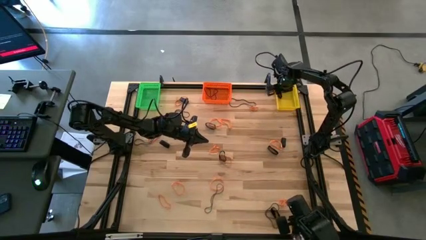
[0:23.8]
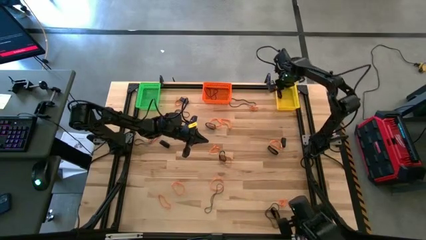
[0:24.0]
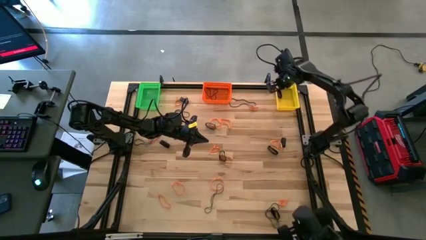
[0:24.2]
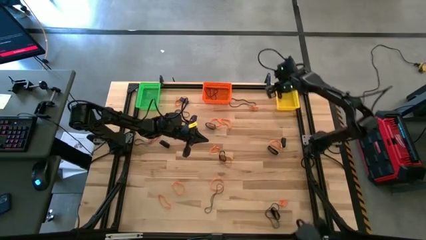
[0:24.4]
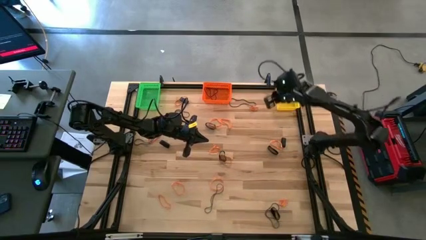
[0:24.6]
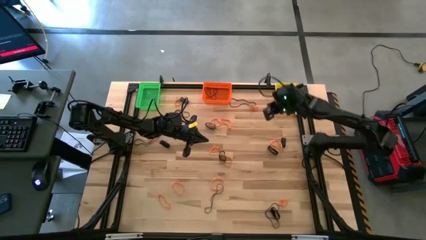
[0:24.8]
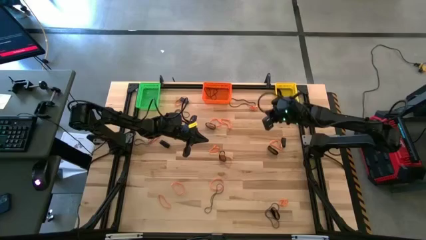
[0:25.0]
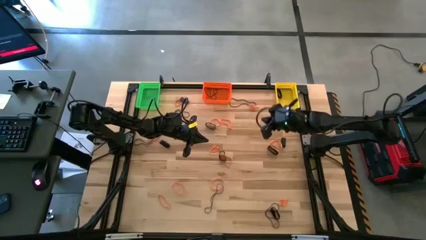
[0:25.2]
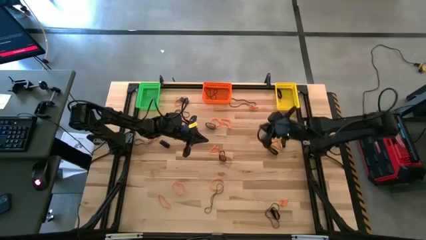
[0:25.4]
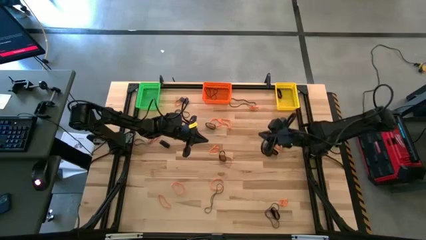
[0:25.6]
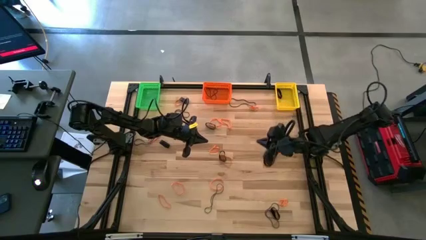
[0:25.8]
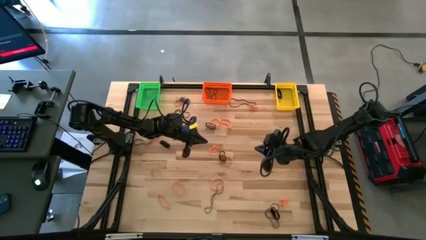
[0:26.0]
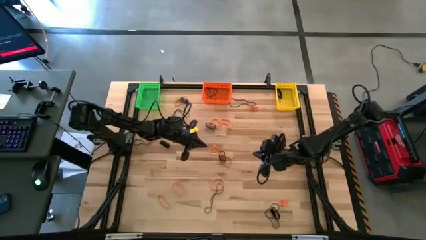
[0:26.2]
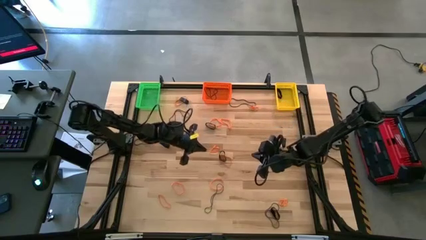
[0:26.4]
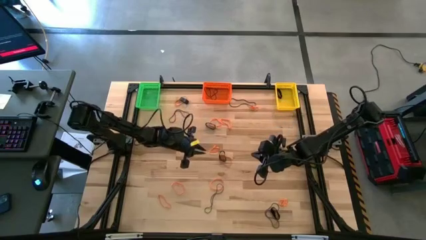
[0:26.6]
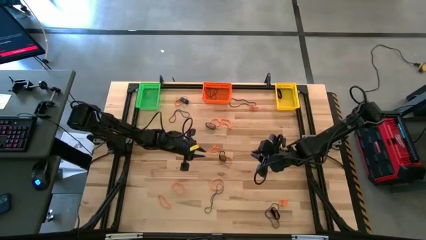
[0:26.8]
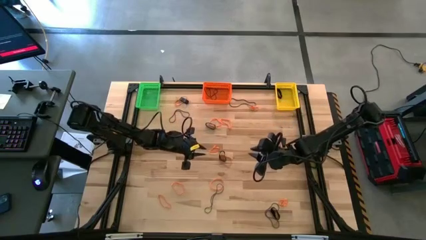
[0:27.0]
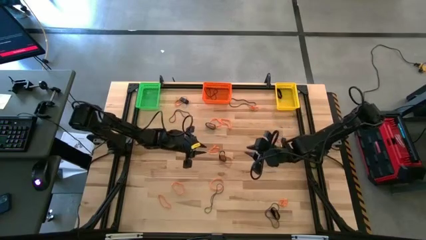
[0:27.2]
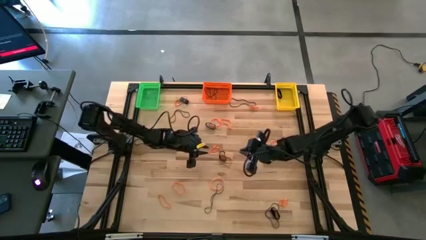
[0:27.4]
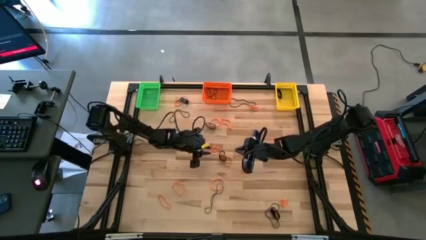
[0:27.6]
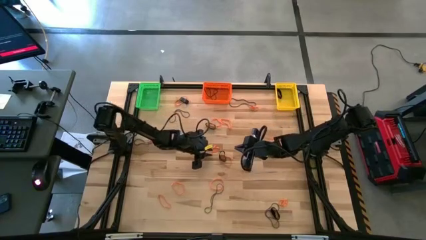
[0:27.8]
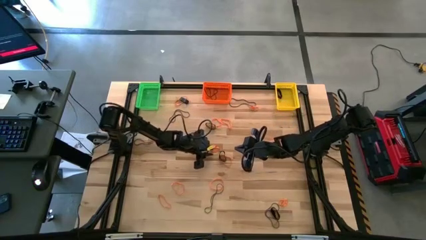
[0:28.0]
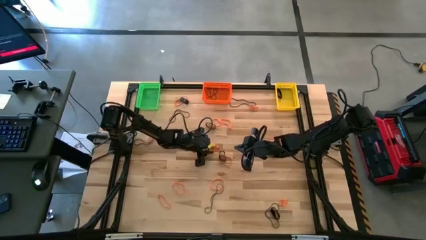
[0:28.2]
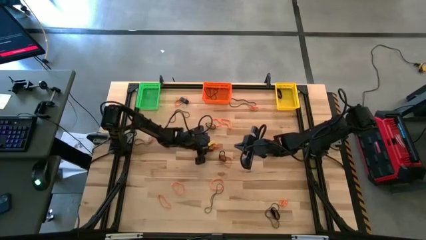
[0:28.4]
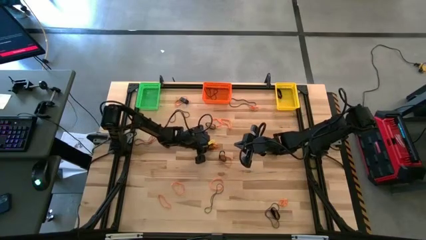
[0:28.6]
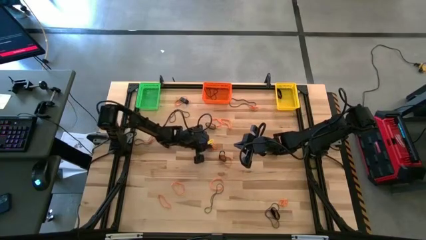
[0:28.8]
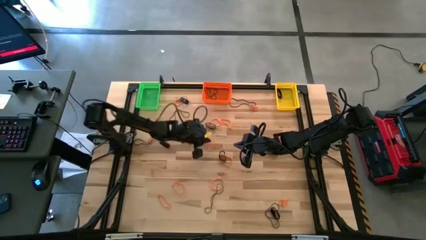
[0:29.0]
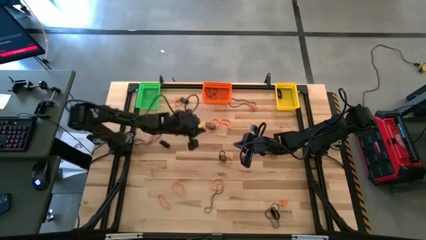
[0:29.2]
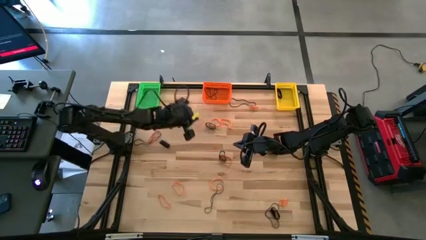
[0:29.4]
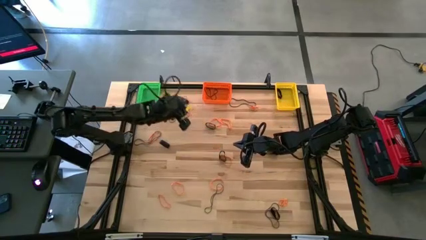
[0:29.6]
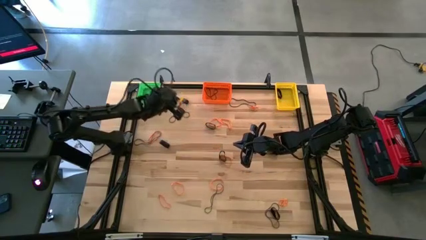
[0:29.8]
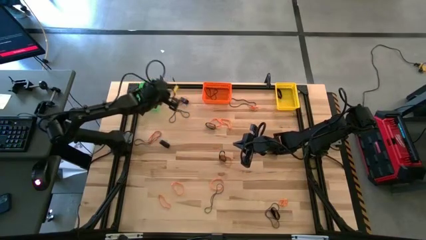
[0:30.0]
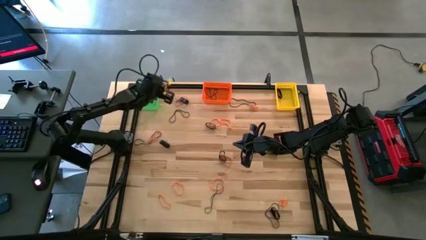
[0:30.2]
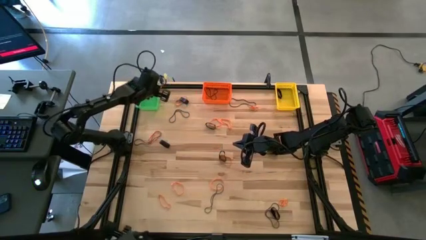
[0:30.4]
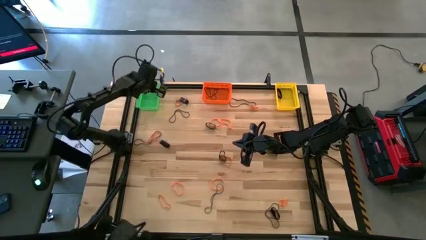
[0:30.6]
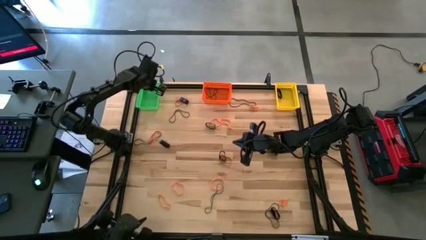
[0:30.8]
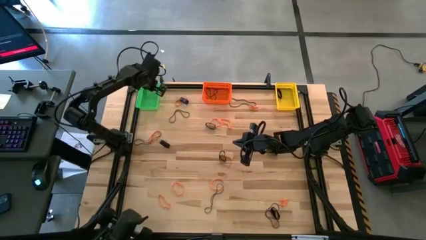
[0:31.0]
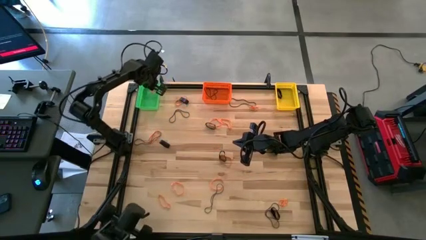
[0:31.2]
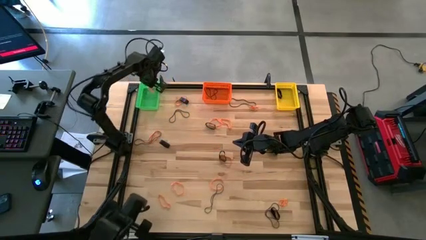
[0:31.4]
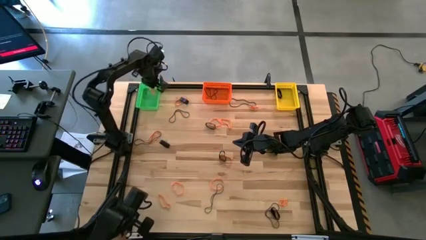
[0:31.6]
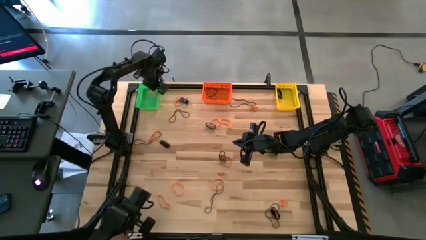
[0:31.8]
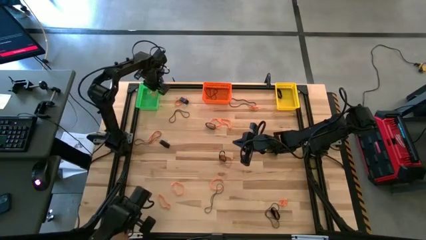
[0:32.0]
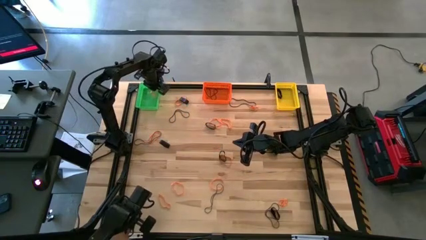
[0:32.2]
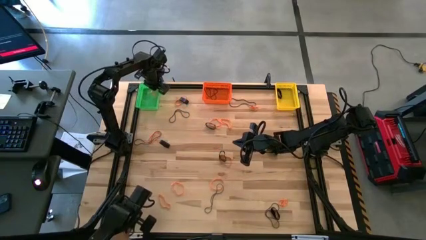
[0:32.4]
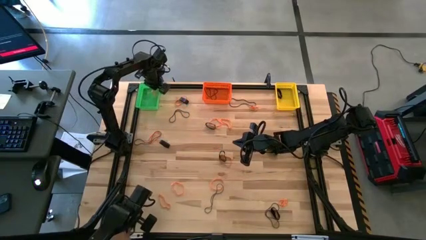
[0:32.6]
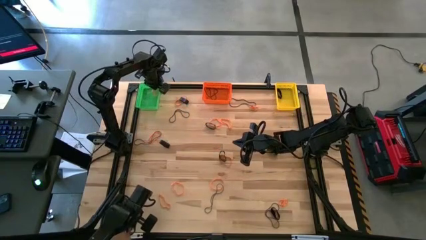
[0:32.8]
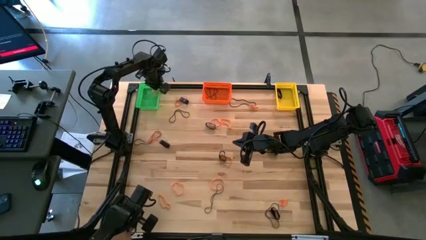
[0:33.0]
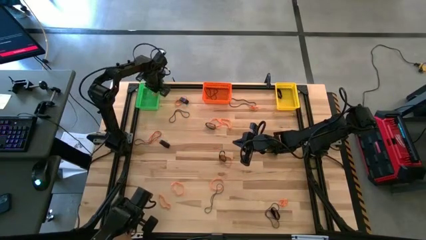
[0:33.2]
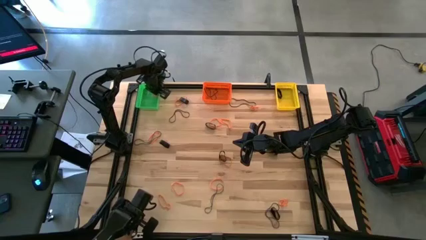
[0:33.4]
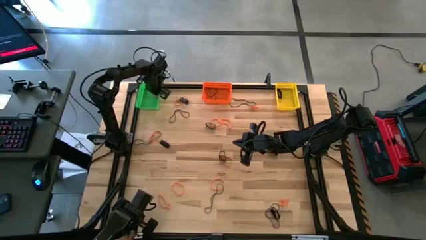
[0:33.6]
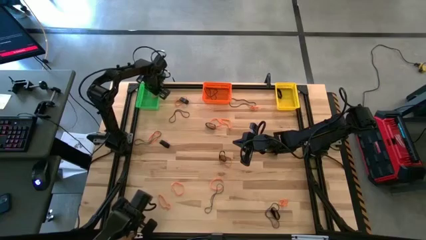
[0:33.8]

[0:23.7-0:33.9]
Task: Sort rubber bands into baskets
Put the center orange rubber band into the green bin
